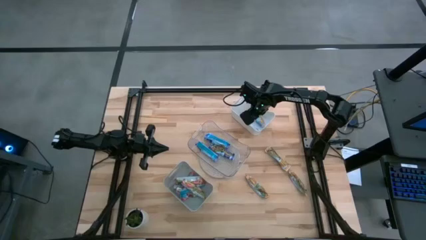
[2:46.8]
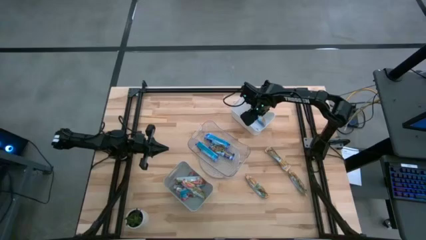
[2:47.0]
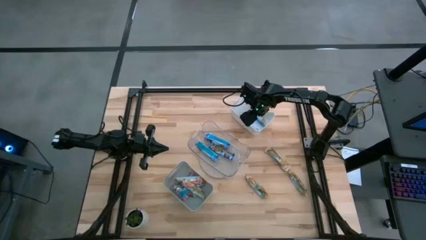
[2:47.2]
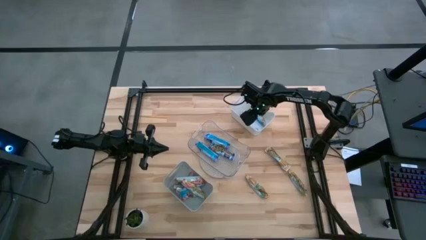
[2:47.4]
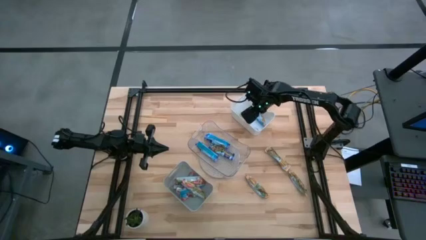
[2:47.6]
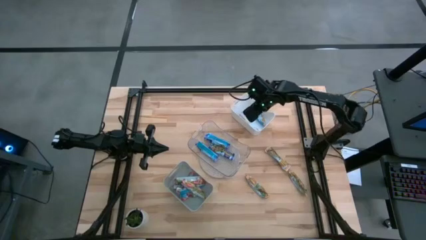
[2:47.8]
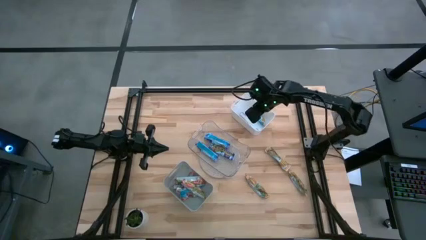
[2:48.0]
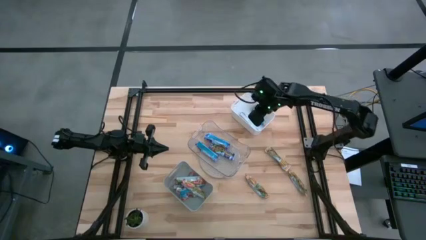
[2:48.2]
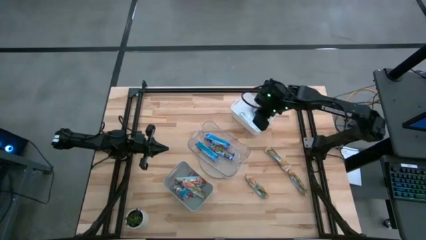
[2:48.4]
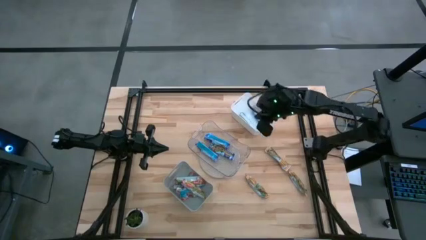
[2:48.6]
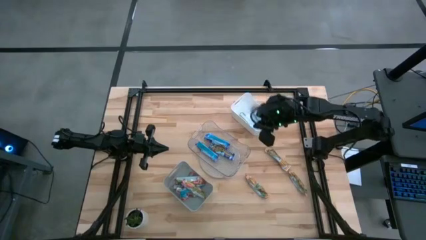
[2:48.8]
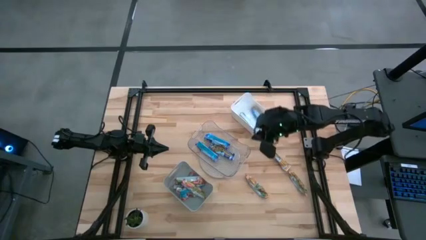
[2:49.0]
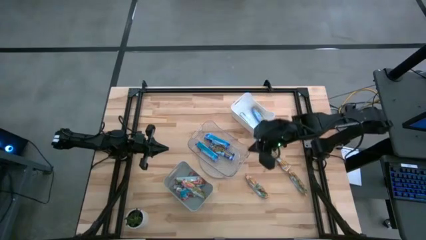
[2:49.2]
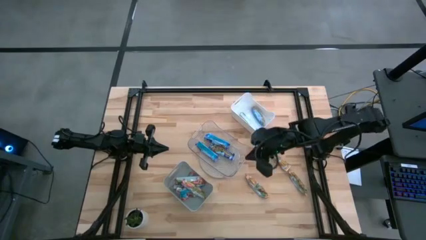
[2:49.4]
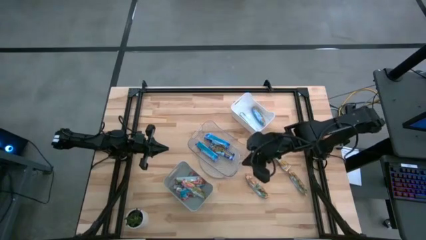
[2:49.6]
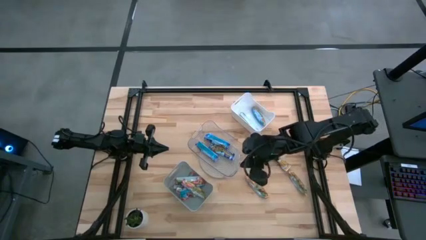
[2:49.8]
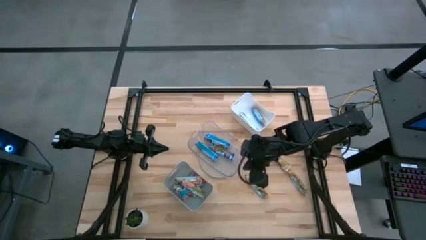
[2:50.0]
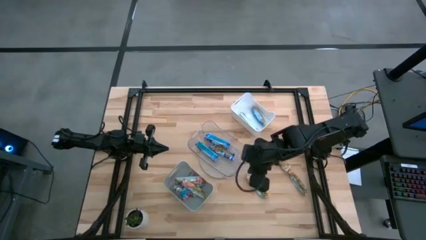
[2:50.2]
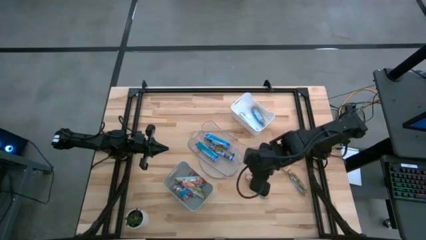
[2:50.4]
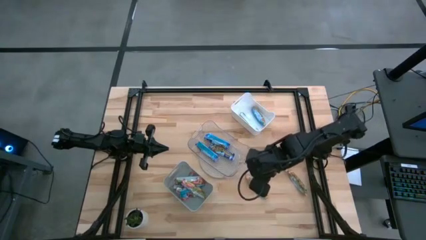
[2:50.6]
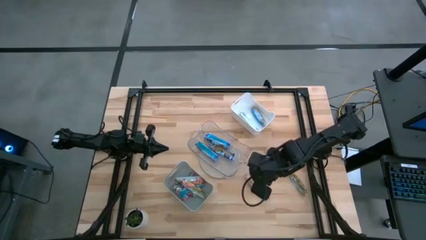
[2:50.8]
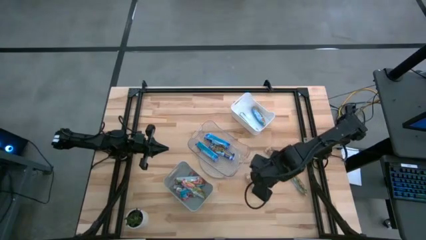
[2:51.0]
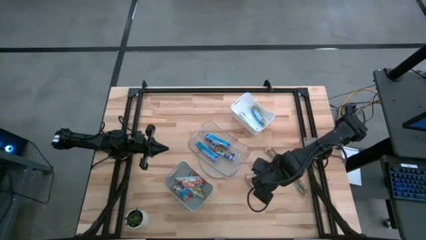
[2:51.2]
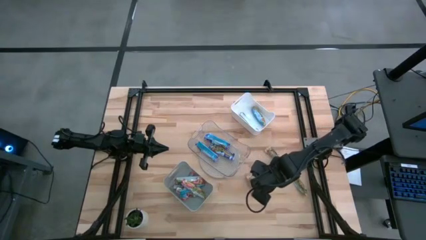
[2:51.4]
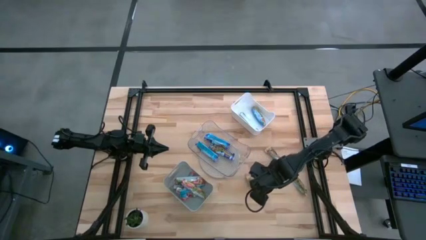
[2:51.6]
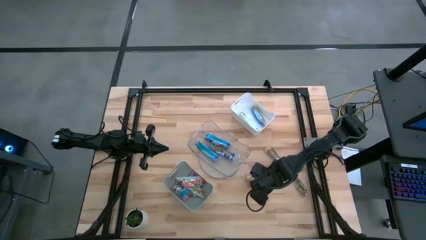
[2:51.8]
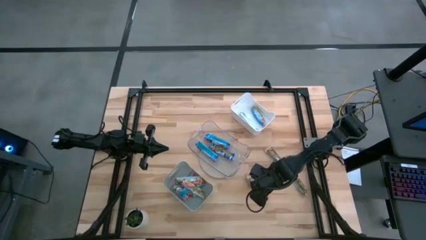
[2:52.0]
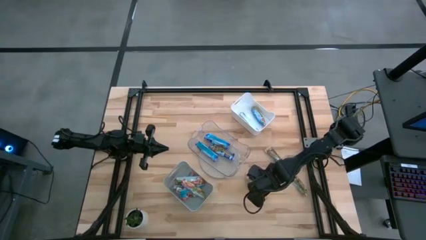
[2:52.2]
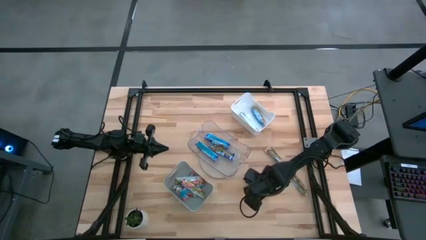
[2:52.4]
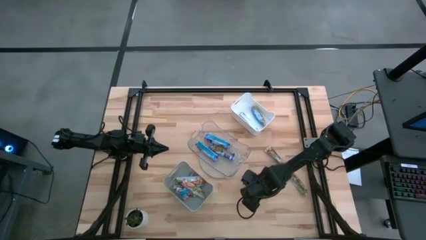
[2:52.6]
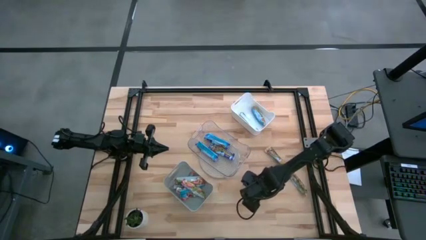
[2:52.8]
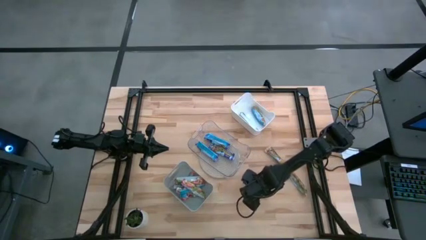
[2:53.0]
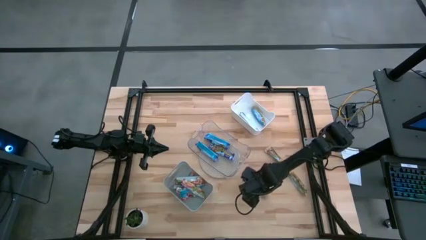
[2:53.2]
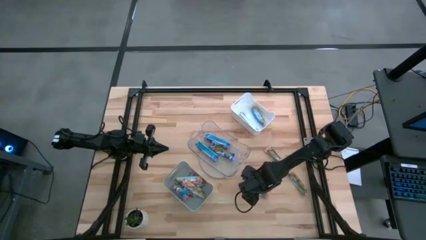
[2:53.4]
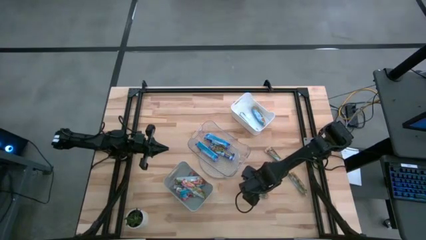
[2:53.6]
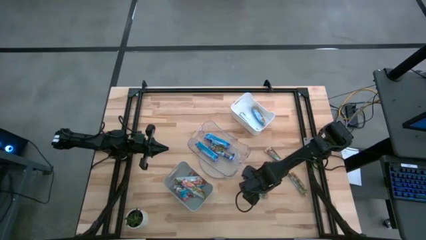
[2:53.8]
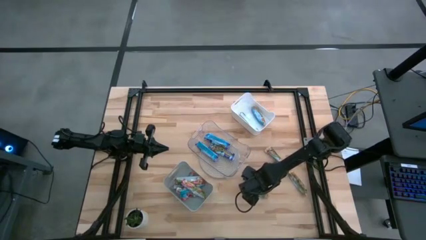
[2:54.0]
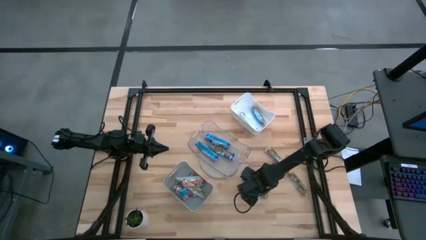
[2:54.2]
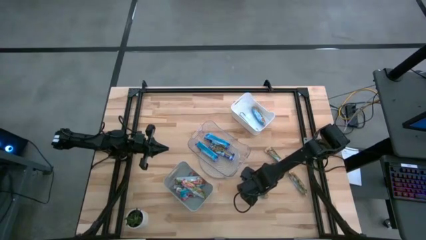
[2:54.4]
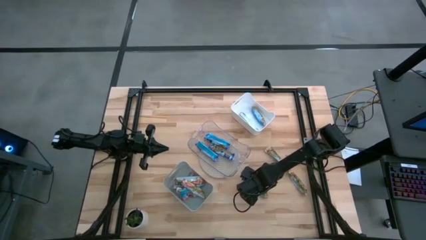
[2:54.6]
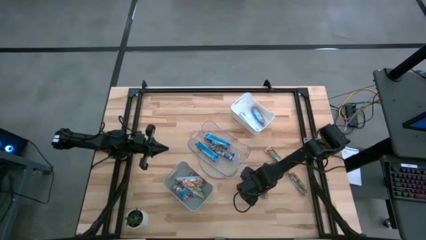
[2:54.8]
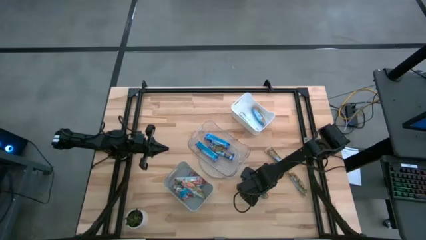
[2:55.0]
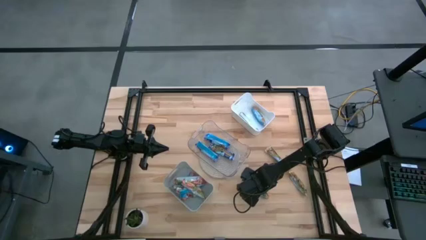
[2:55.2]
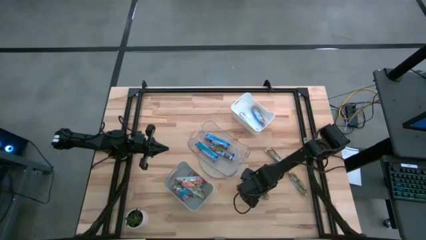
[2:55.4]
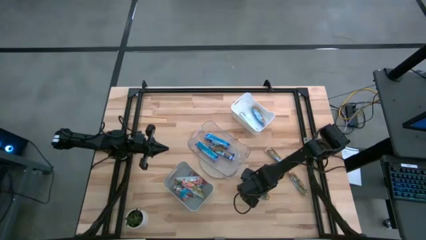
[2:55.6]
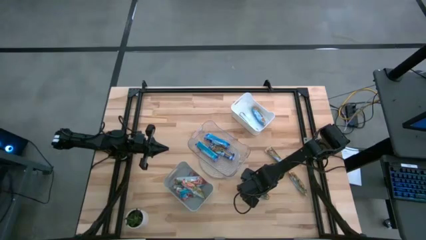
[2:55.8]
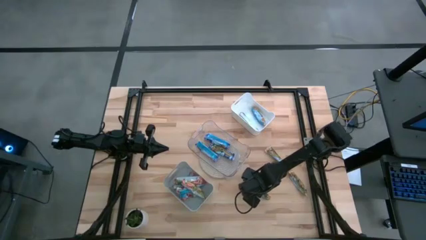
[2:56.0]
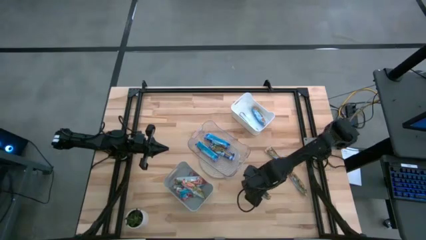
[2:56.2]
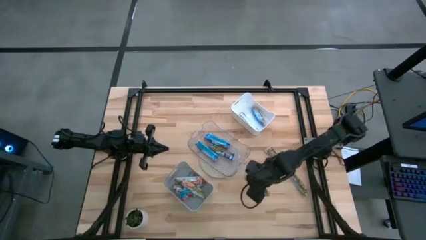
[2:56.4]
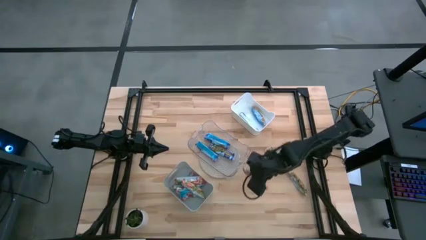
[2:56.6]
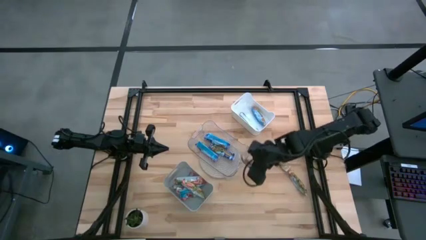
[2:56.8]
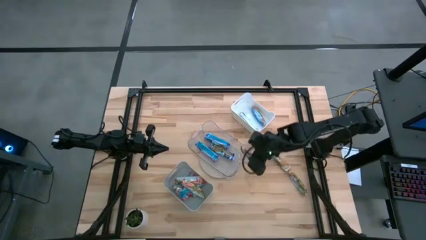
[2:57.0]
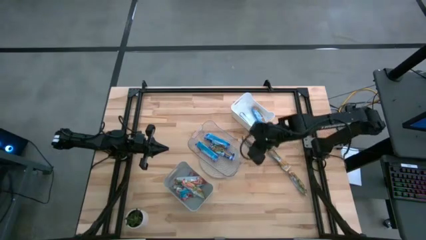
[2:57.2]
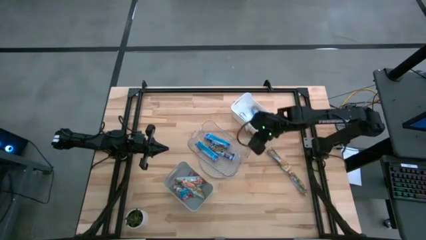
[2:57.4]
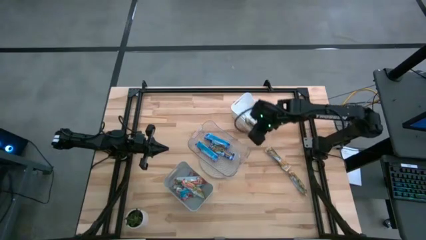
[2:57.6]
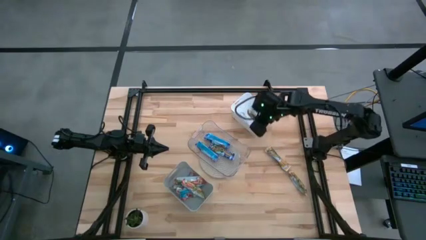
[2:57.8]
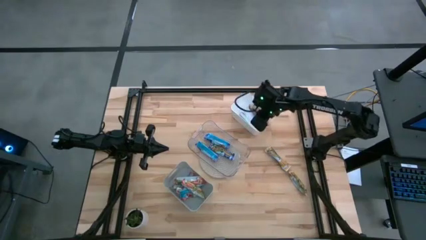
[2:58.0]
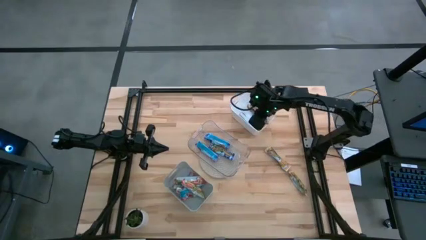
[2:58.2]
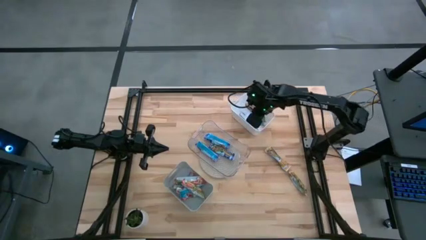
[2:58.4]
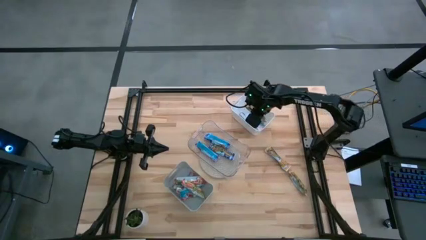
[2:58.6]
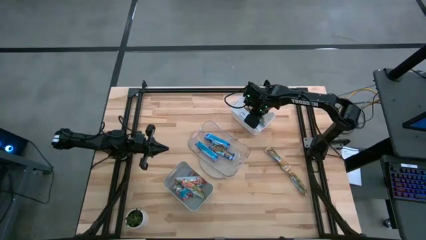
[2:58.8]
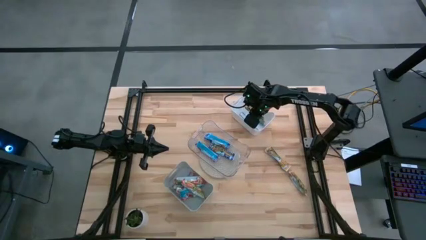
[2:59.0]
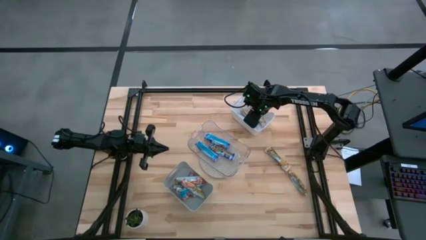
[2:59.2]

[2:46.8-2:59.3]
Task: Pick and place Granola Bars by type
Put the yellow granola bar into the white bin
